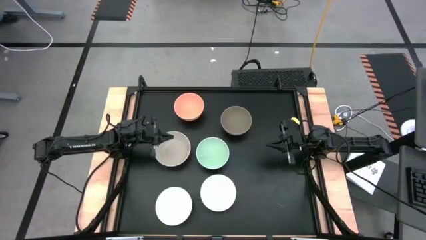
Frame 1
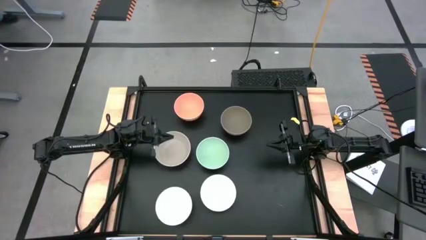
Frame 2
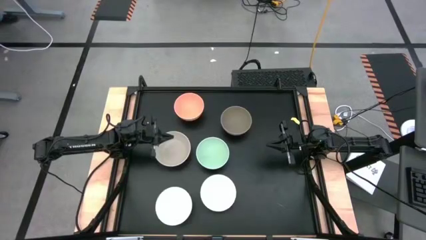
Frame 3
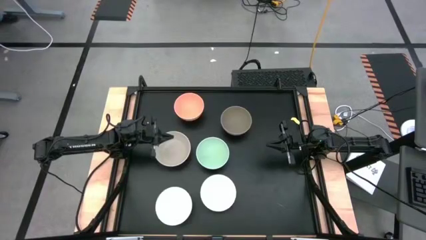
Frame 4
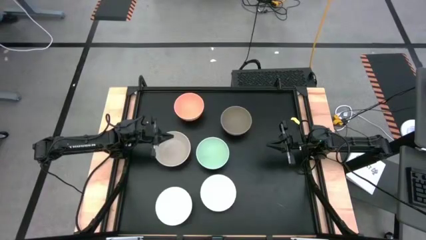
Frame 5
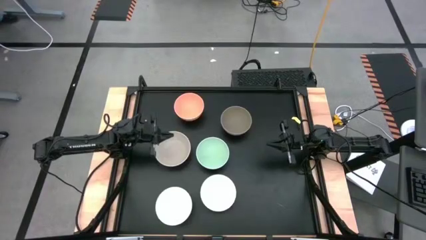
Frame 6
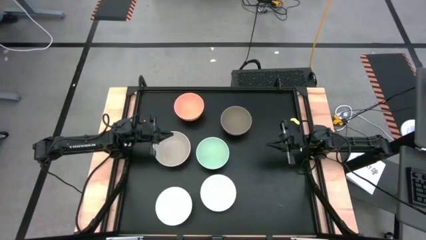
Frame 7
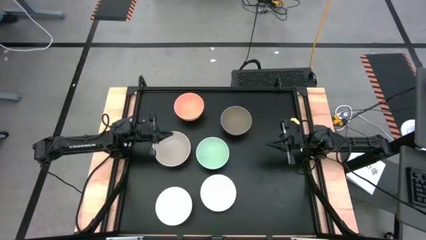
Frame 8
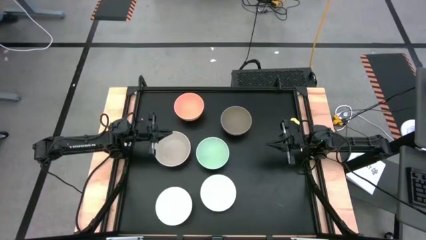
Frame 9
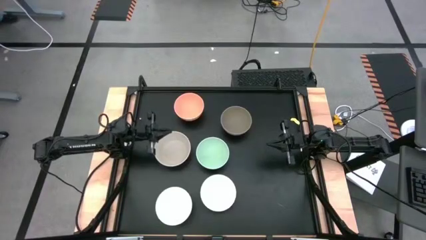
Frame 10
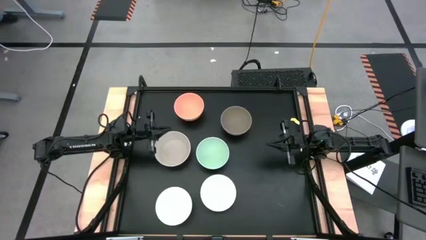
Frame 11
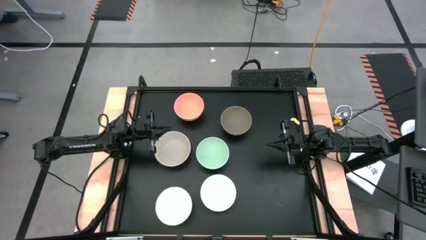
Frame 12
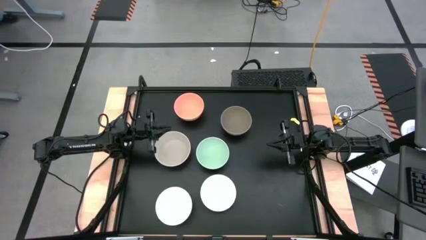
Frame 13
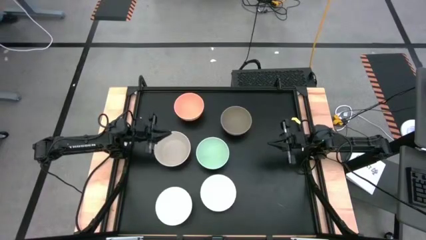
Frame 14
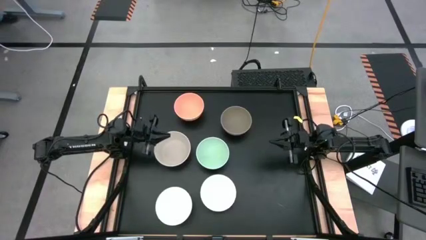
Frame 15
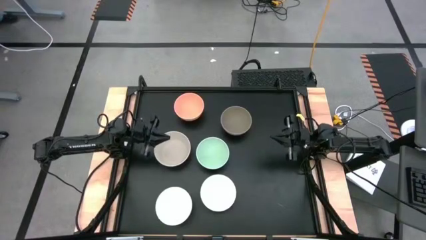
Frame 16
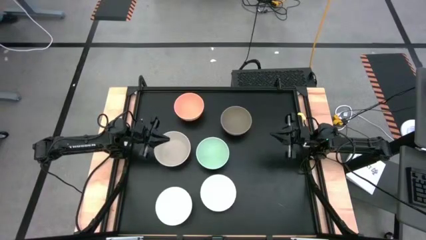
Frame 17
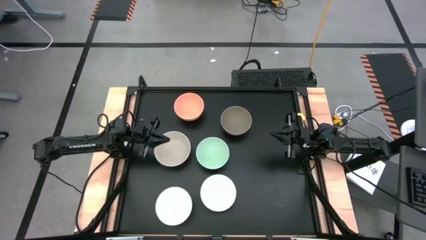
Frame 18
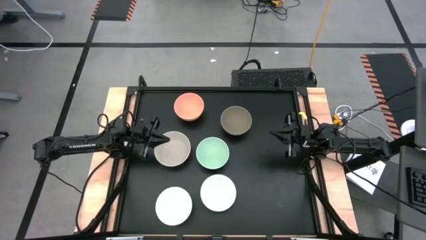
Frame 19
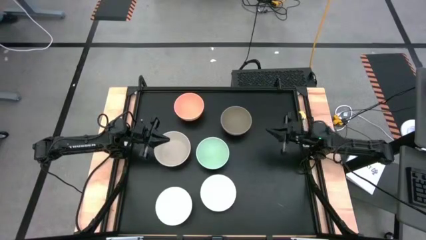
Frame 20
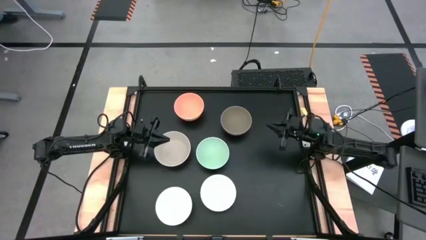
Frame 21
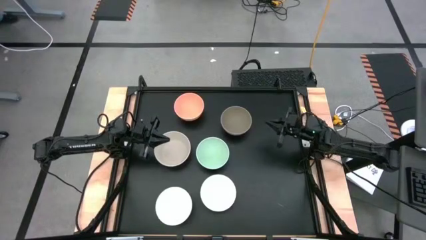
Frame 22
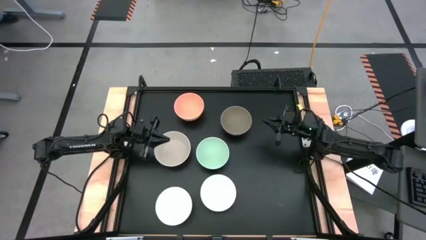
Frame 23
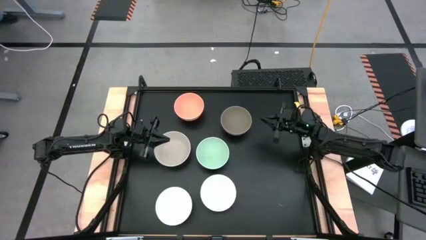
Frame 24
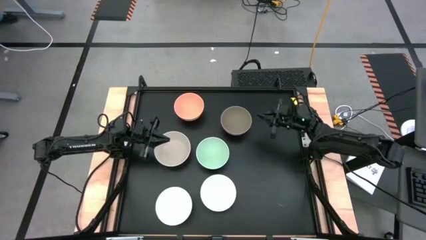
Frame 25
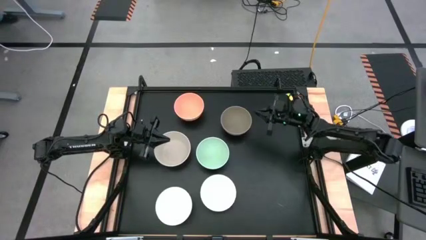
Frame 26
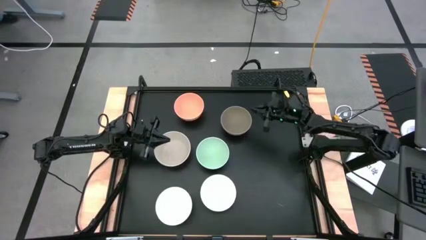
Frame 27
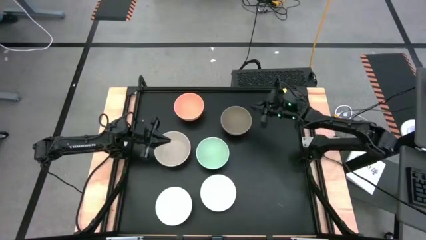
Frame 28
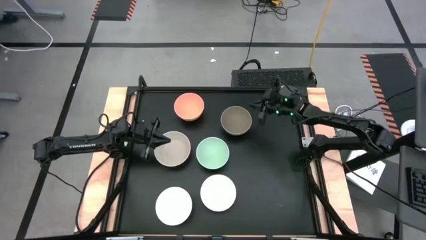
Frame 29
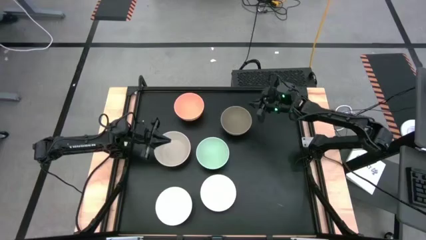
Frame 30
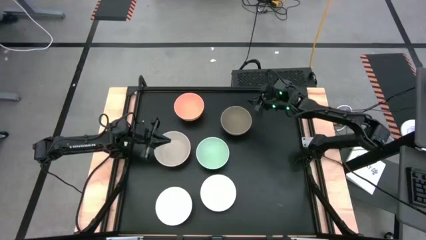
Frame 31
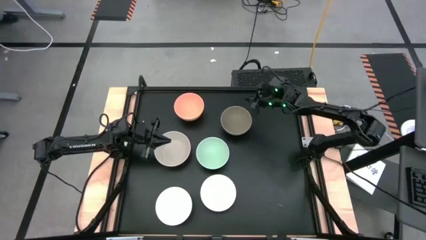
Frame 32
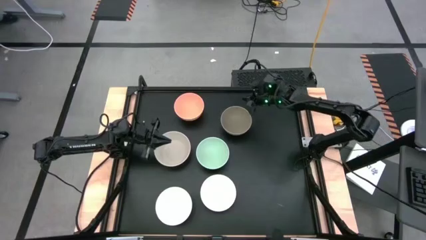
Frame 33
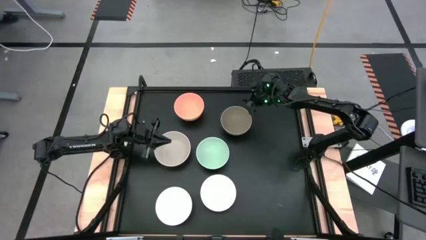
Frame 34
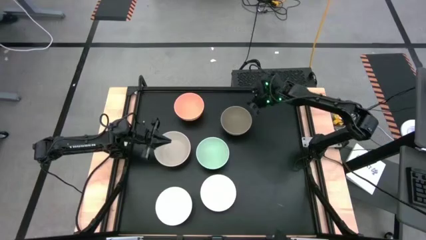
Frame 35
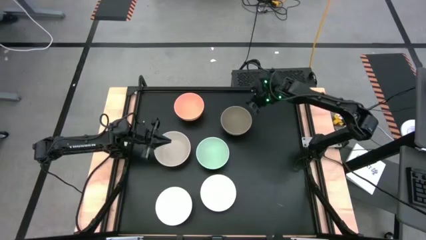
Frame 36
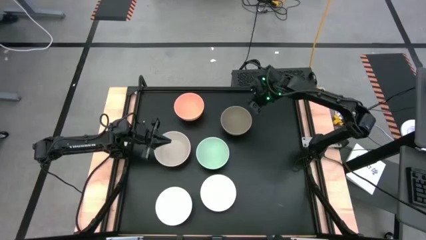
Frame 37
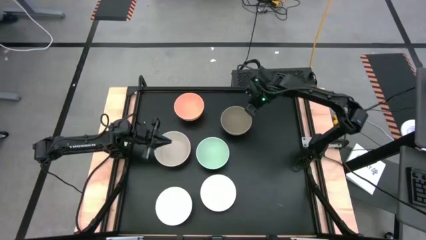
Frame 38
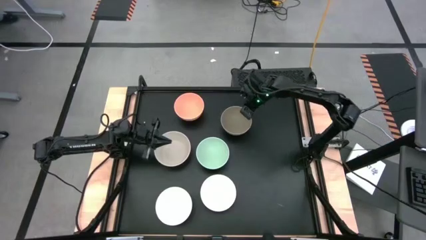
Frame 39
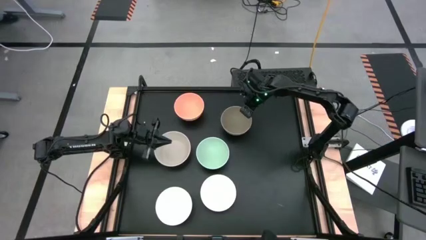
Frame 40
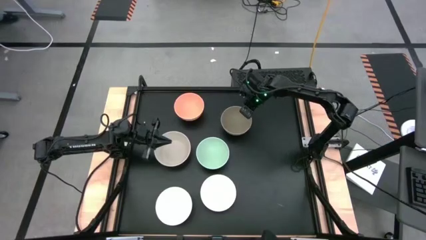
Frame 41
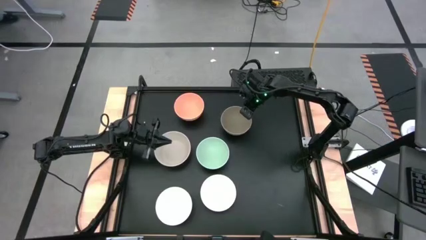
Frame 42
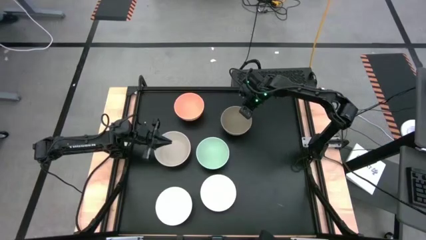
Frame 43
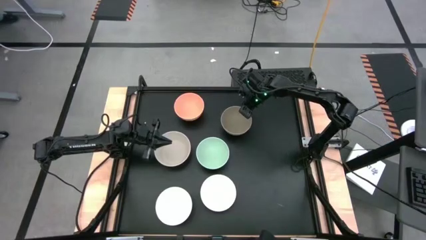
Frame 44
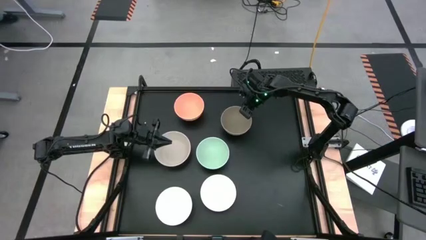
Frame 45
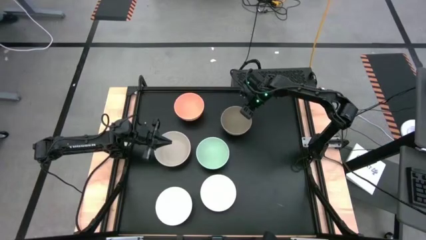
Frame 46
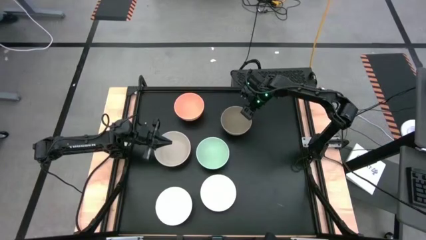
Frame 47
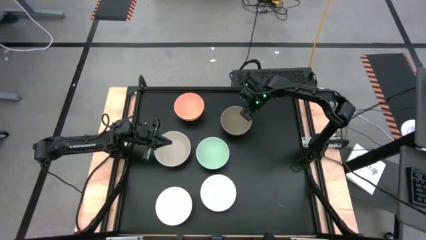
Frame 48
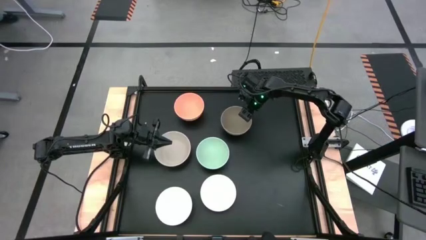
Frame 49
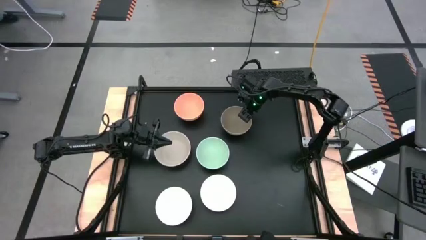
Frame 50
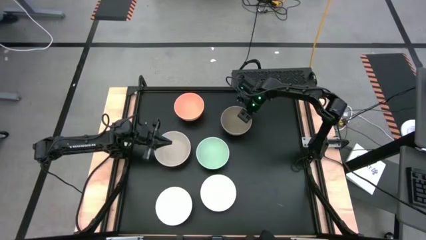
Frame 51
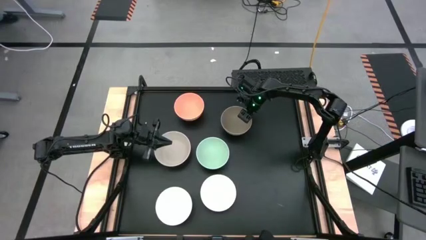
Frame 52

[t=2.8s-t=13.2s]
Task: Nest bowls inside each other
Stack the brown bowl on top of the green bowl
